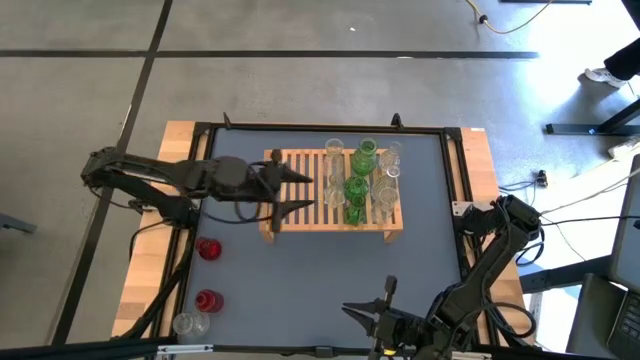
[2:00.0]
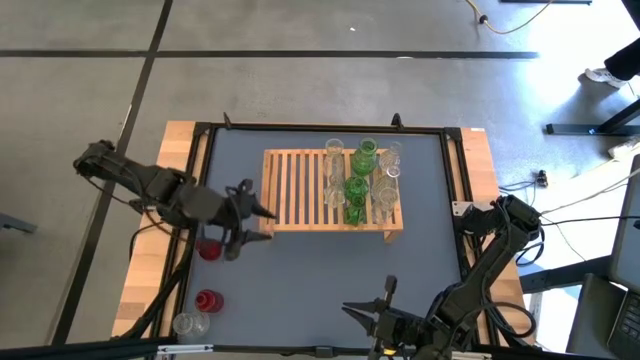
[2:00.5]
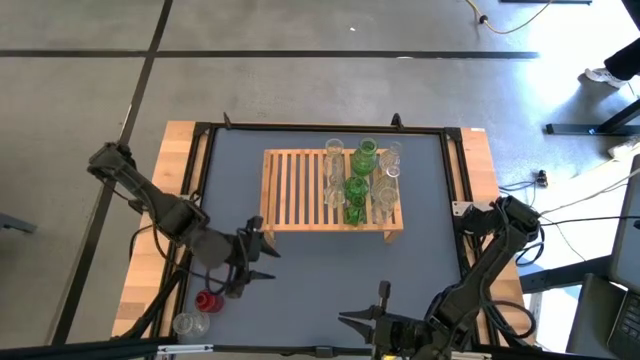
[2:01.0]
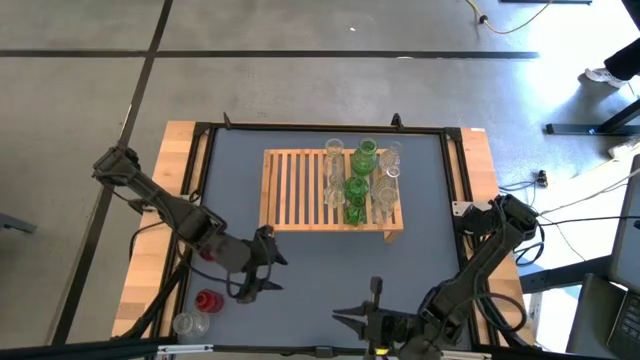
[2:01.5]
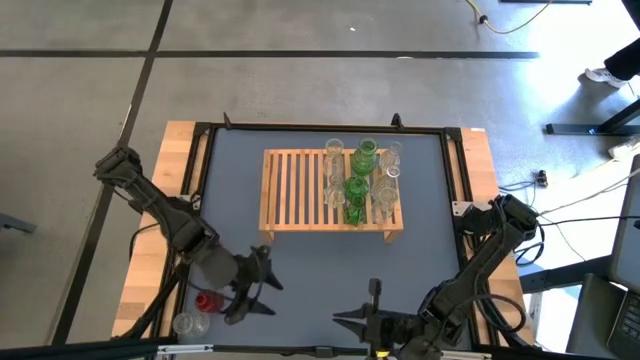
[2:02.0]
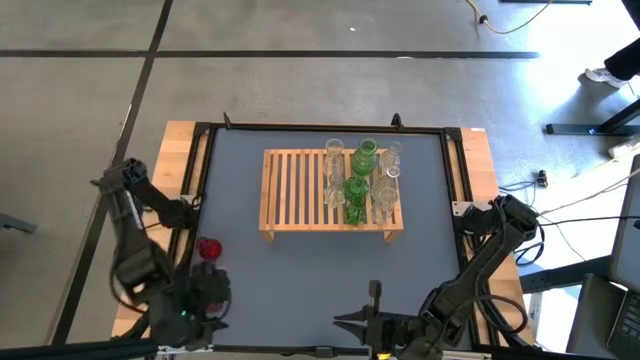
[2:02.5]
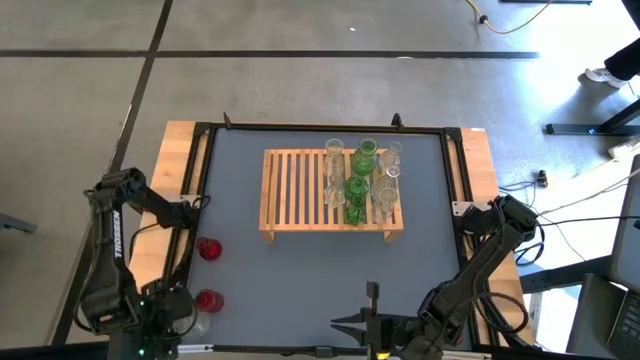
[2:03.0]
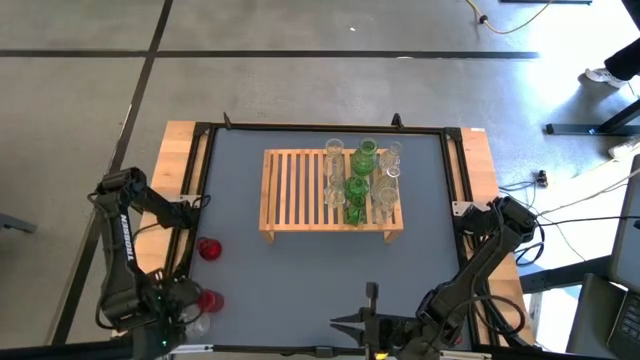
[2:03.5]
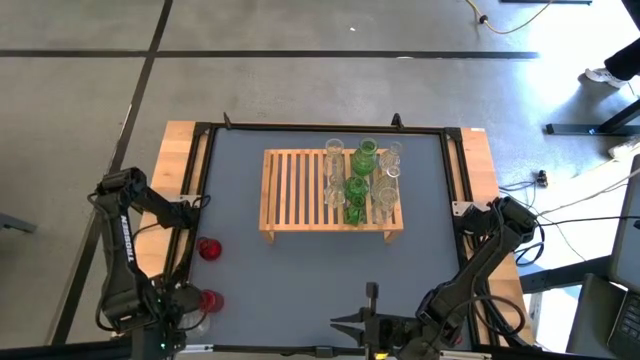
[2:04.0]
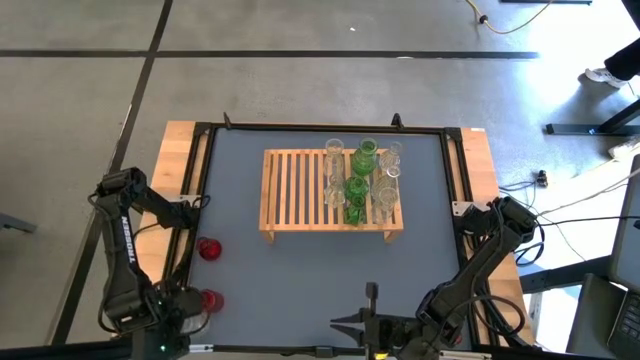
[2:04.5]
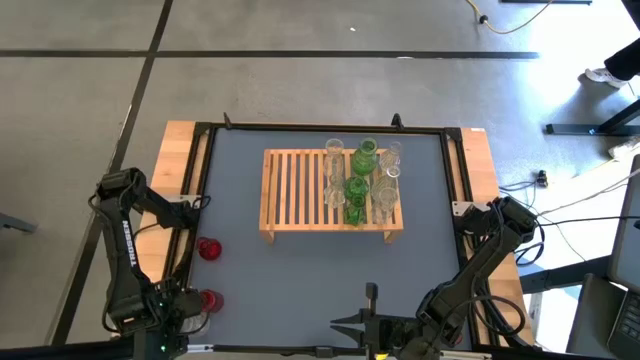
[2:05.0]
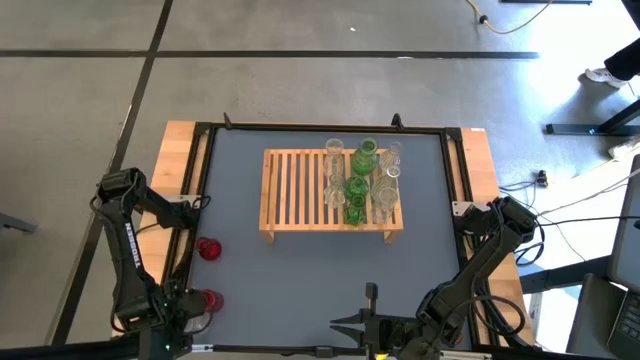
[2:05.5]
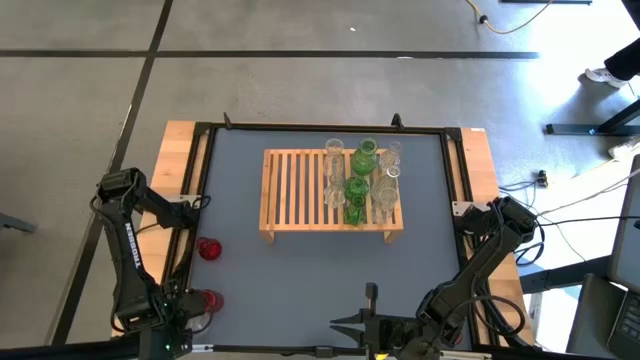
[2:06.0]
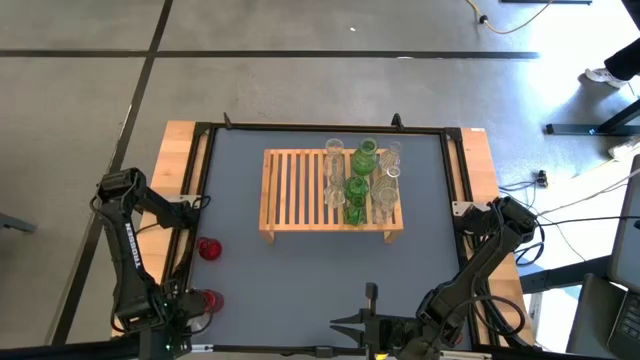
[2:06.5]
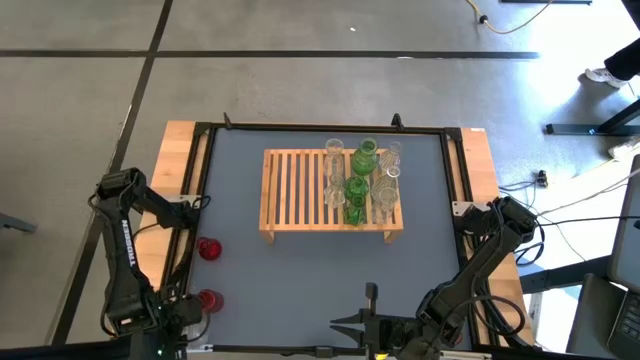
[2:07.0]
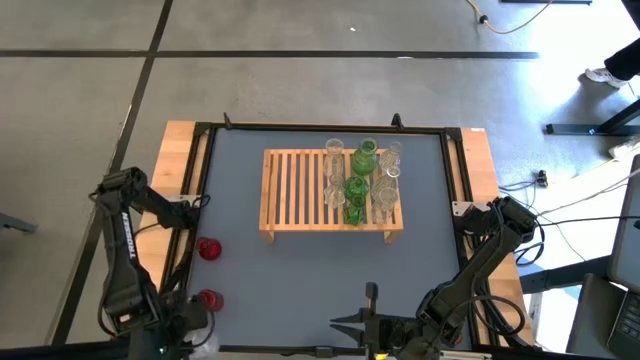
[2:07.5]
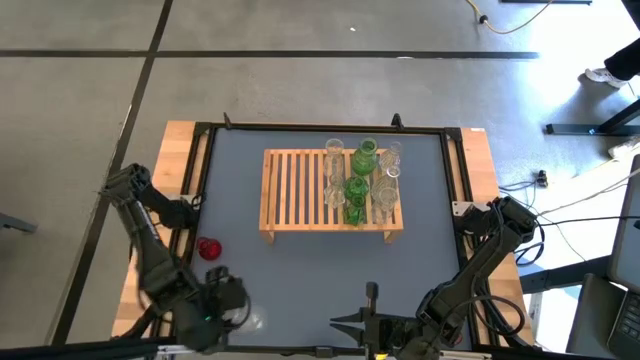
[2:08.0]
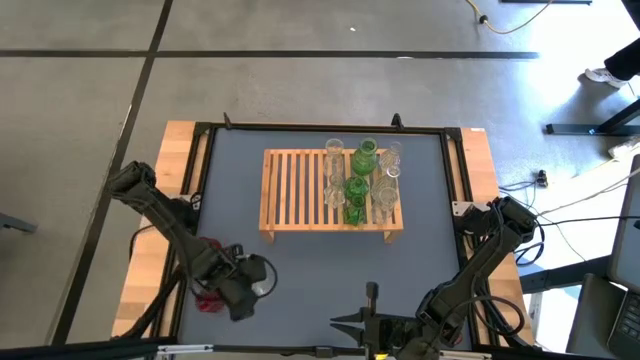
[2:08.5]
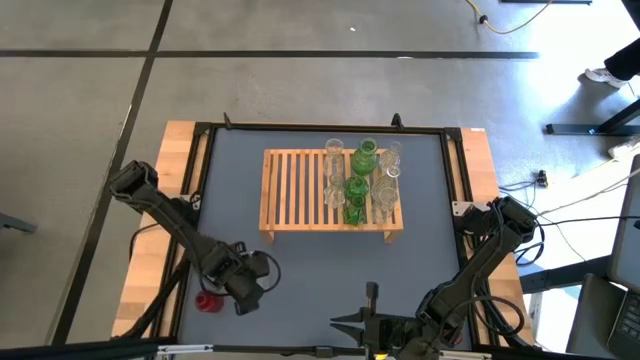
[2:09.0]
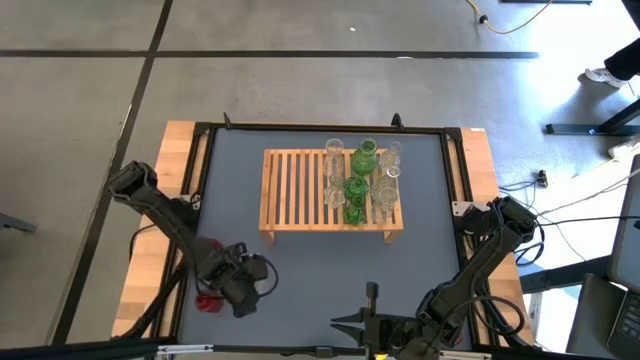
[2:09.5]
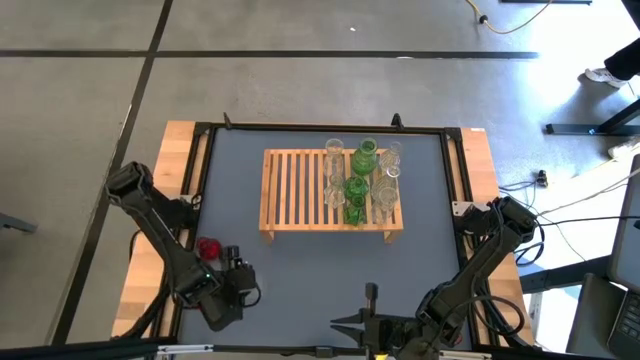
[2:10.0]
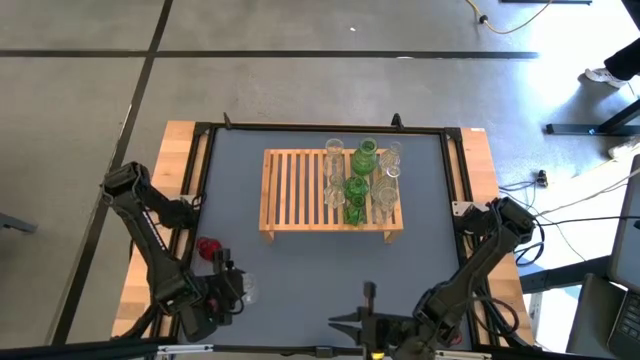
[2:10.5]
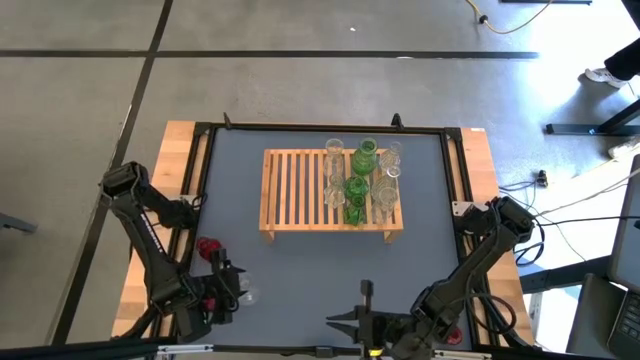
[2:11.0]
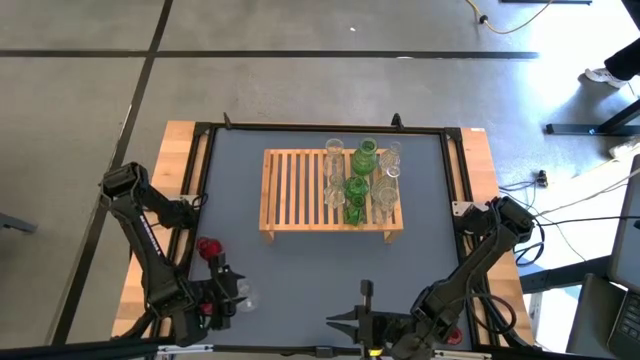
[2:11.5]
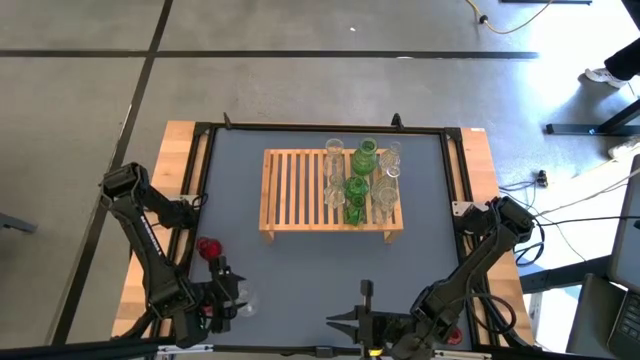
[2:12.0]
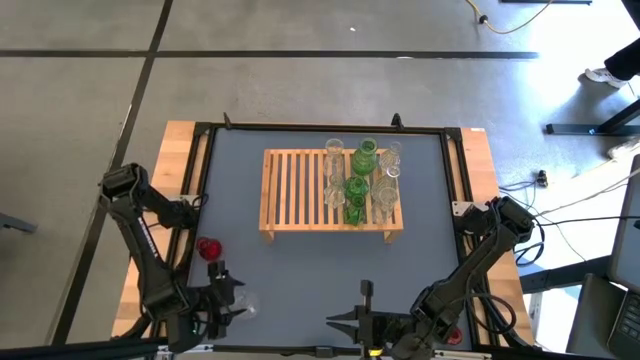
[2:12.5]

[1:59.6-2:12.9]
Task: sort vases onto shelf
Put the transparent bottle on the shelf

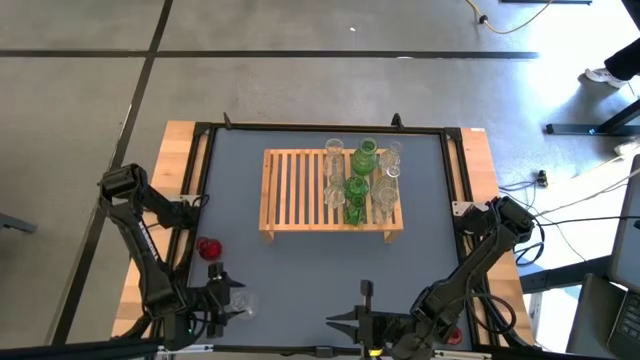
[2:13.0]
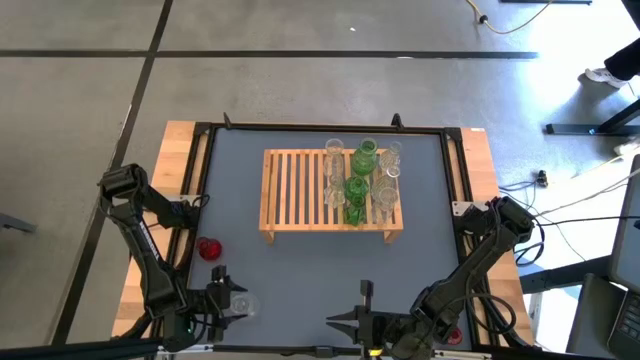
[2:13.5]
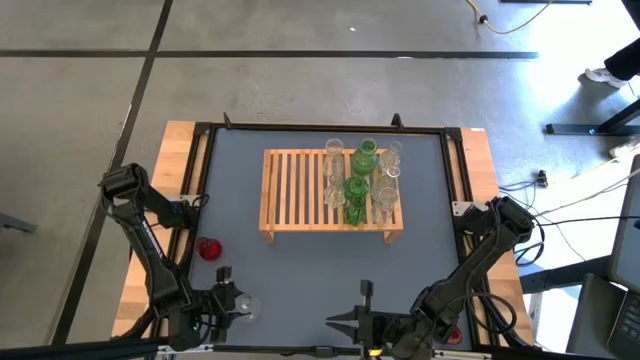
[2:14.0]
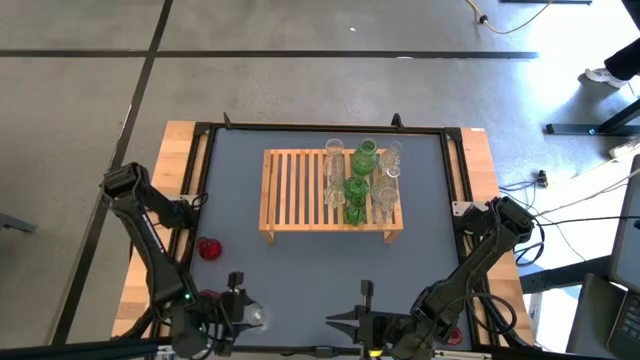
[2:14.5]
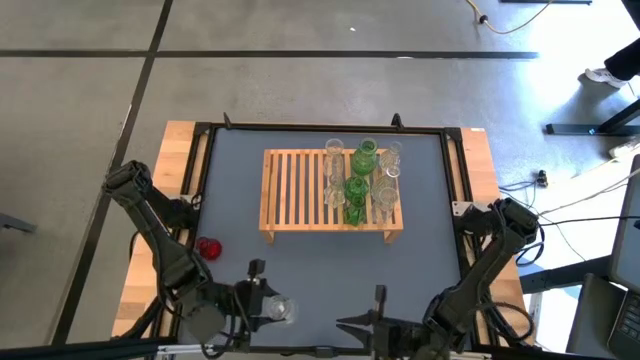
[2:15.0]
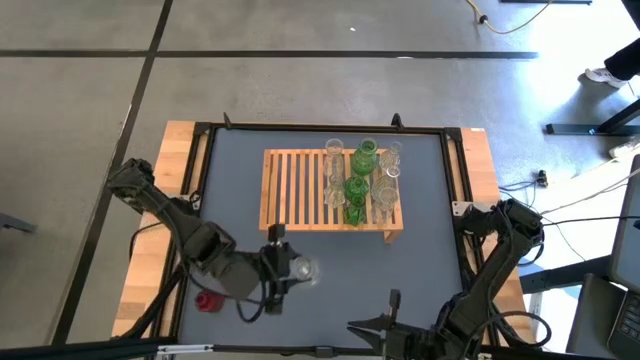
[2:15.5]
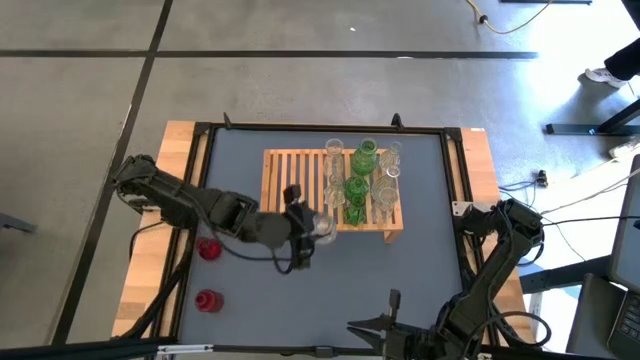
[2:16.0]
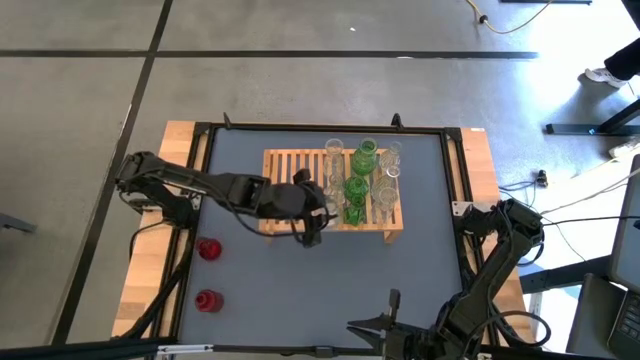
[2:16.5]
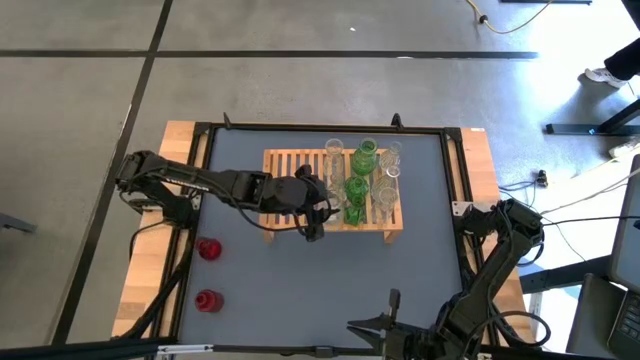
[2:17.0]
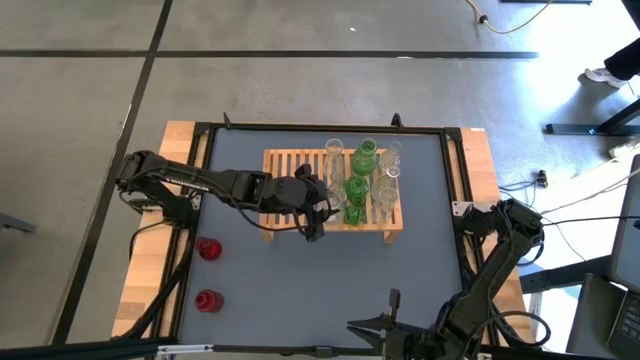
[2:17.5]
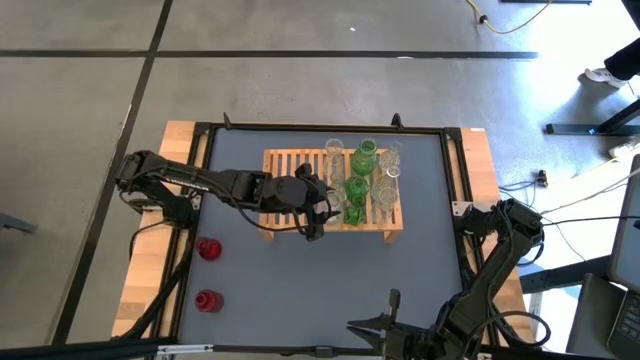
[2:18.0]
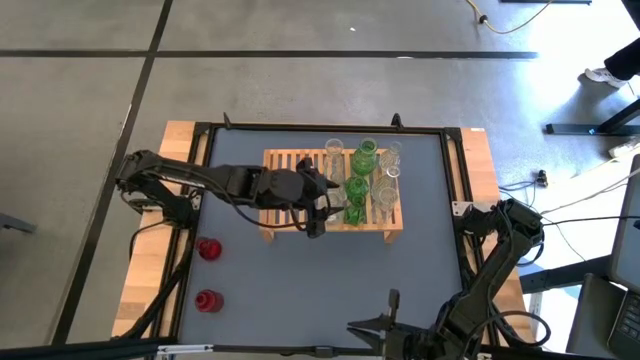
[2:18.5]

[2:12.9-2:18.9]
Put the transparent bottle on the shelf

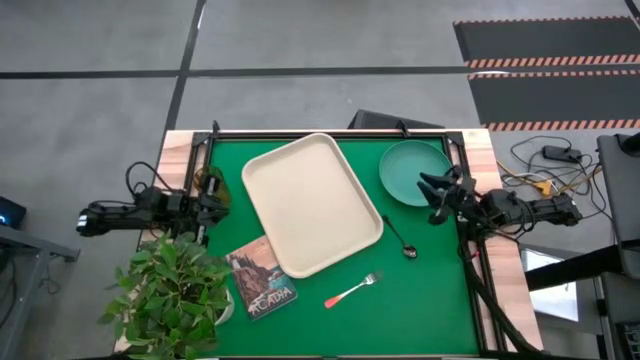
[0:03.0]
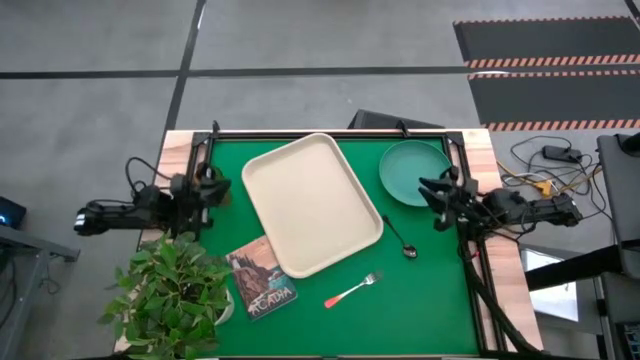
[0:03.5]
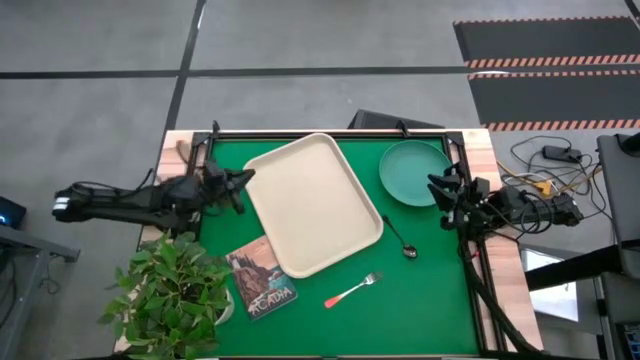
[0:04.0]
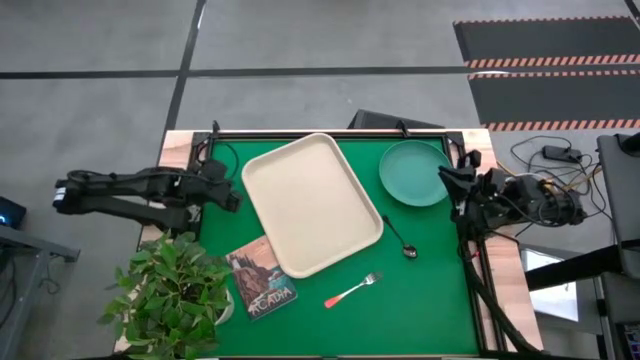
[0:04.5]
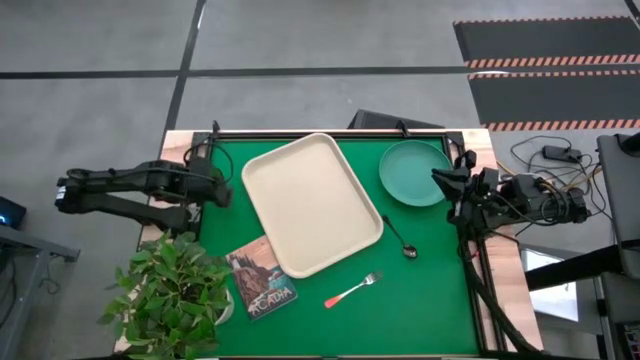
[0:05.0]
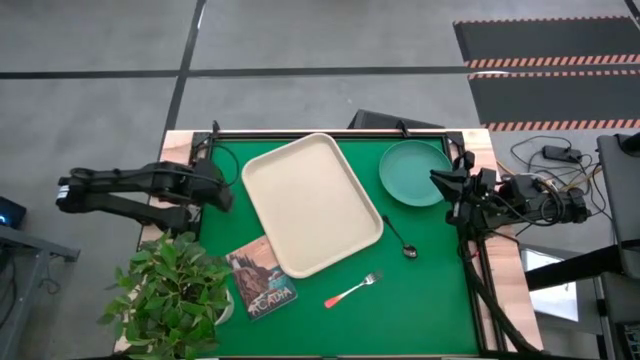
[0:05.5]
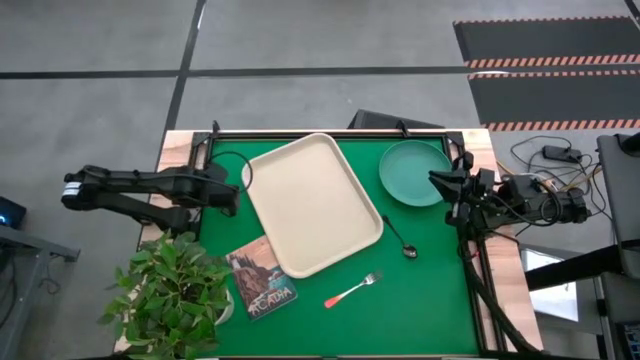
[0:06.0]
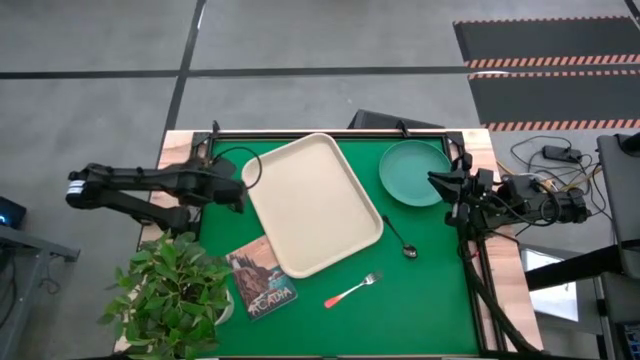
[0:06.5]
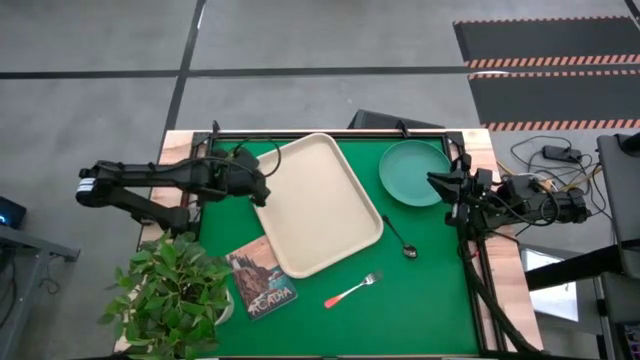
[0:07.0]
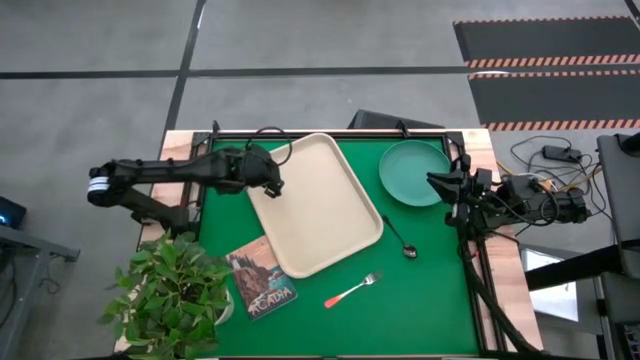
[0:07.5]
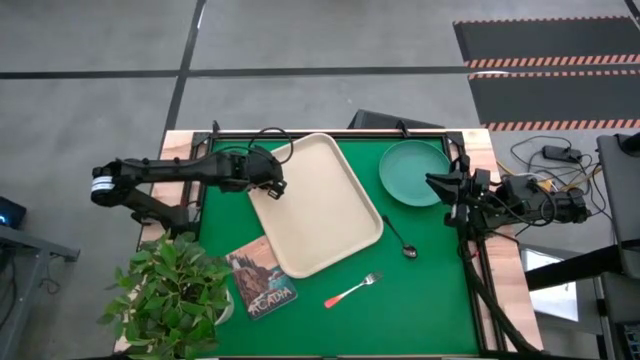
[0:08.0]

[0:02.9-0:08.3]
Task: Pick and place plate/cup/fork/spoon on tray
Put the orange cup on the white serving tray
